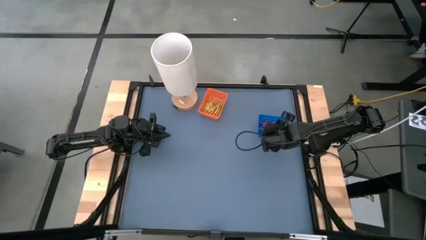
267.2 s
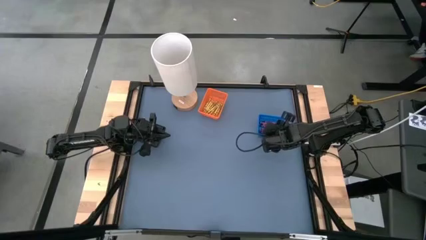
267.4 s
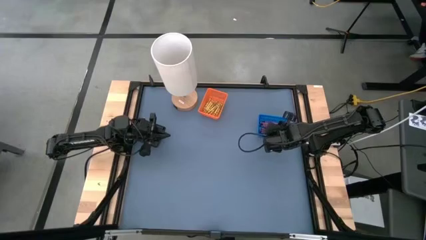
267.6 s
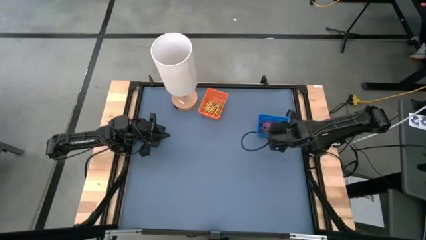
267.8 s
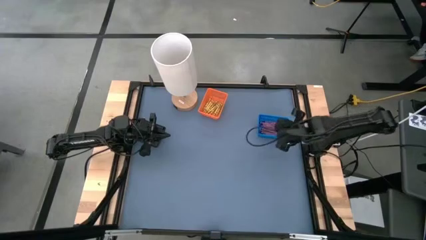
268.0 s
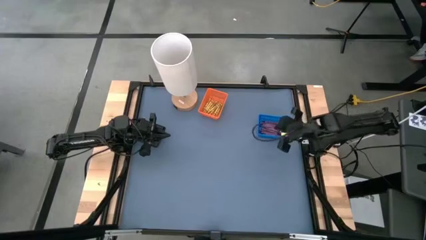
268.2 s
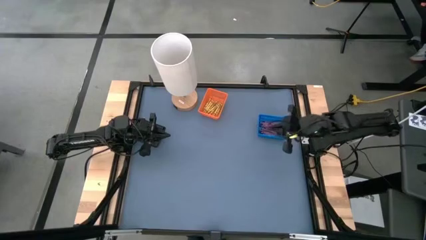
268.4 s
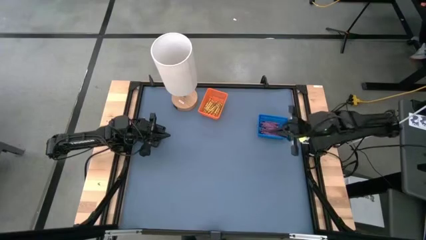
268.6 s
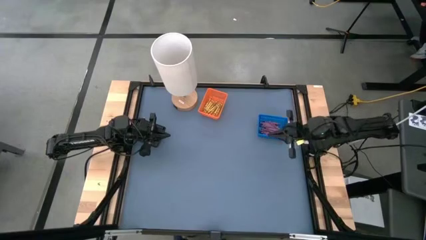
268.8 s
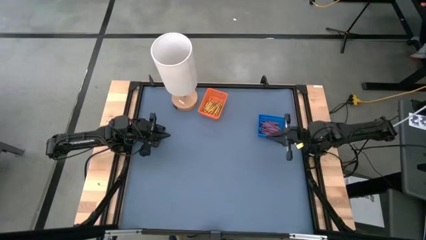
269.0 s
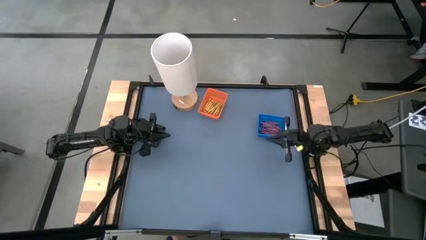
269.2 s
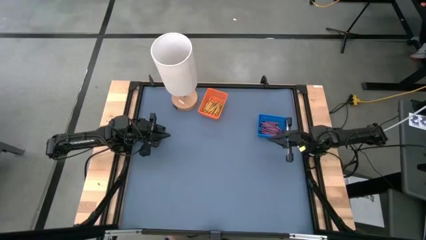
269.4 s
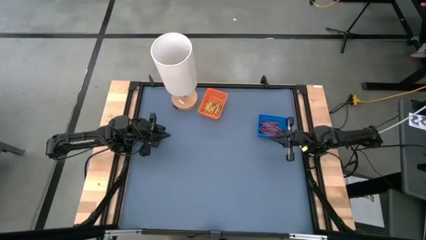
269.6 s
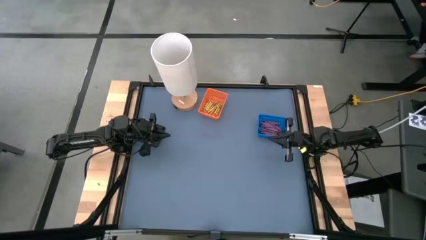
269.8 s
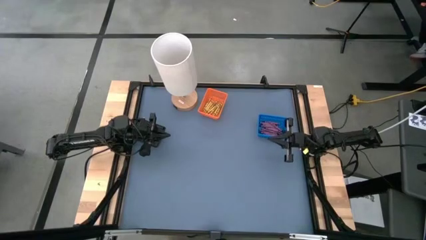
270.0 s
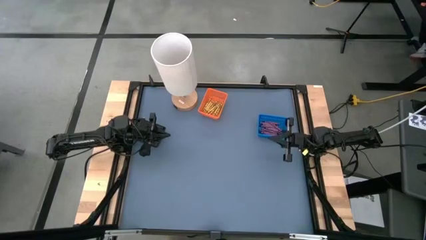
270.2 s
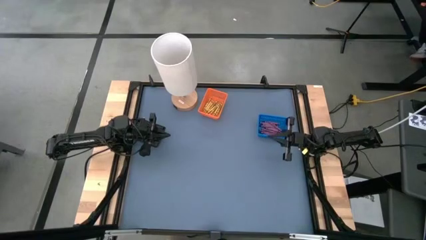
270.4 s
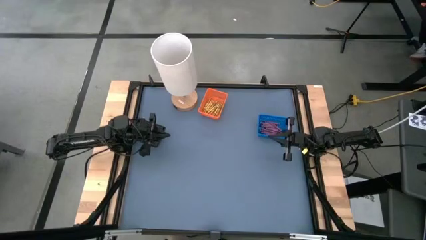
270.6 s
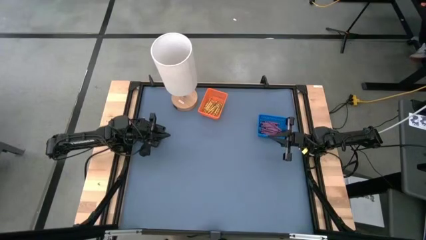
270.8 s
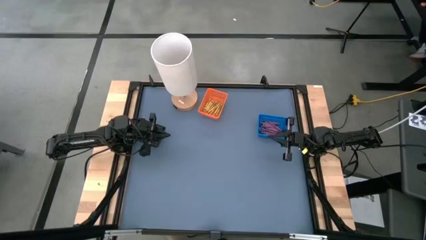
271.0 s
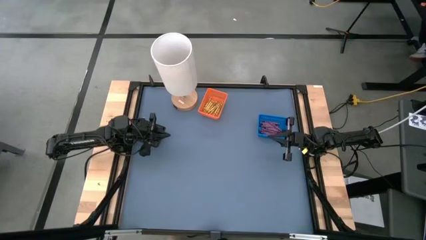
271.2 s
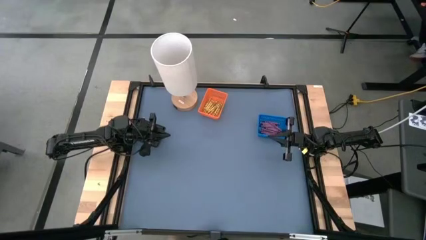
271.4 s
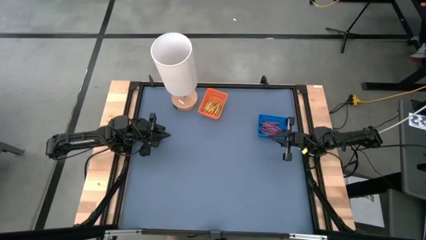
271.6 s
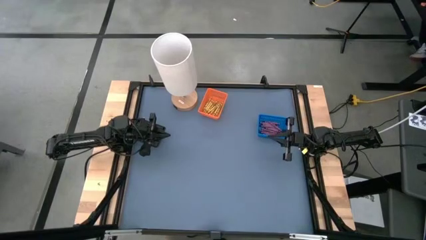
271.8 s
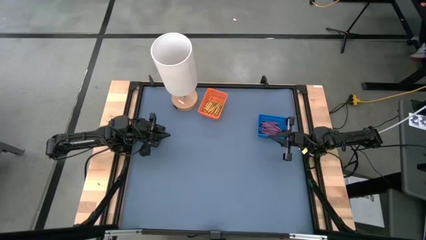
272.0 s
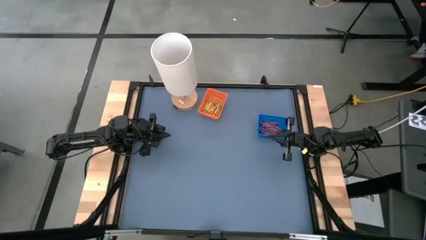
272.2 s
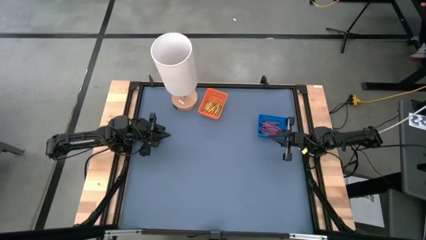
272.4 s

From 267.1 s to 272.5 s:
Task: Sort crayons
Return to Home Position

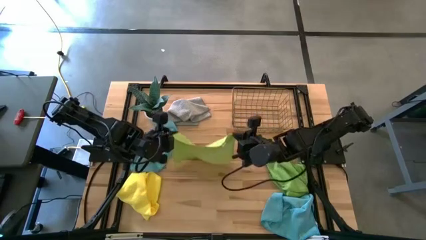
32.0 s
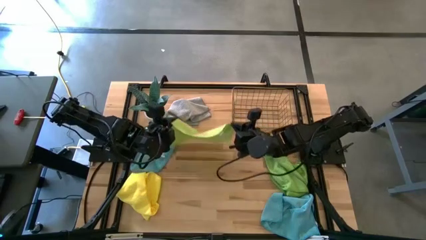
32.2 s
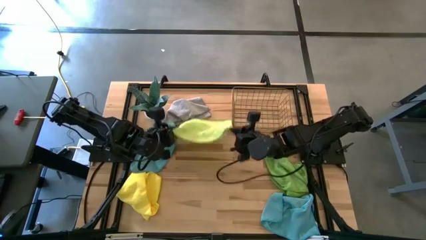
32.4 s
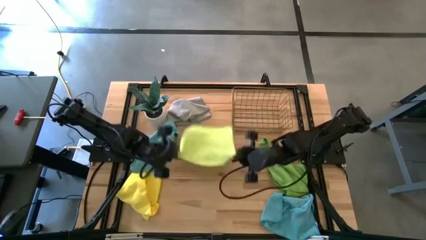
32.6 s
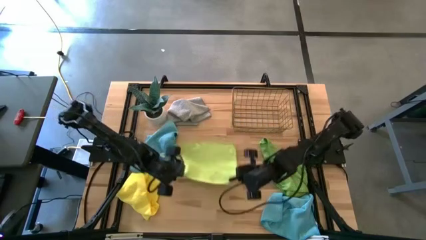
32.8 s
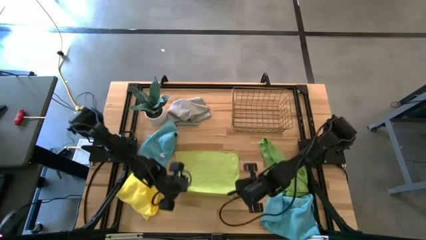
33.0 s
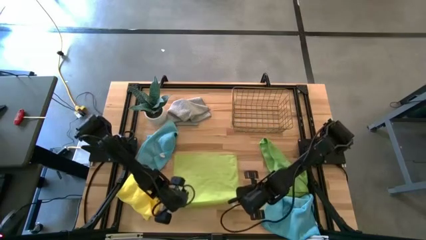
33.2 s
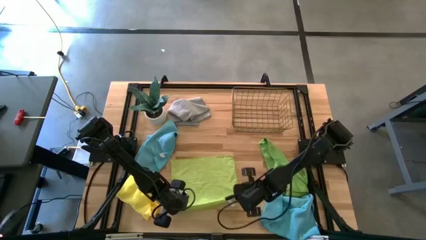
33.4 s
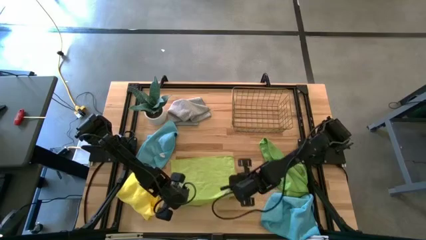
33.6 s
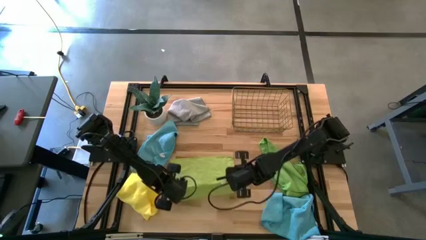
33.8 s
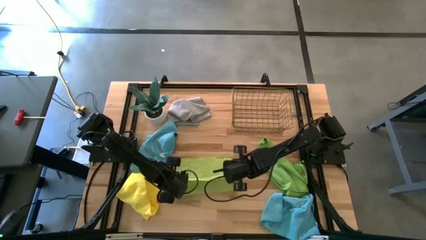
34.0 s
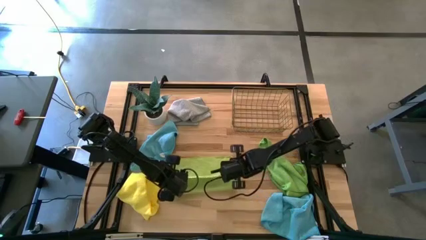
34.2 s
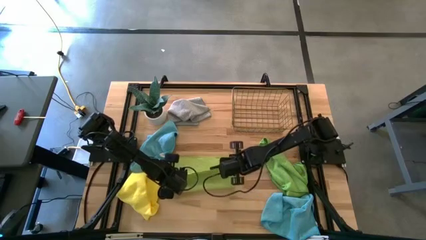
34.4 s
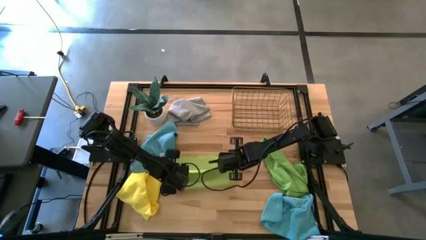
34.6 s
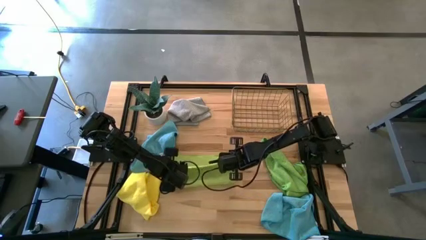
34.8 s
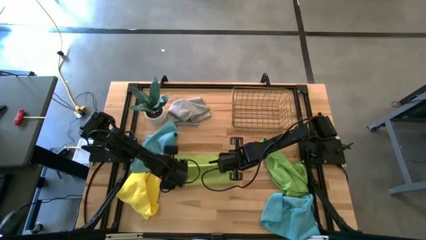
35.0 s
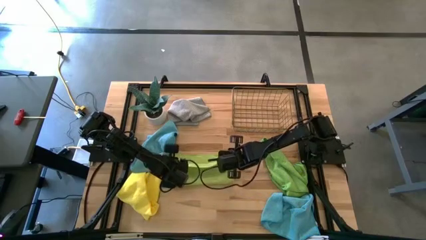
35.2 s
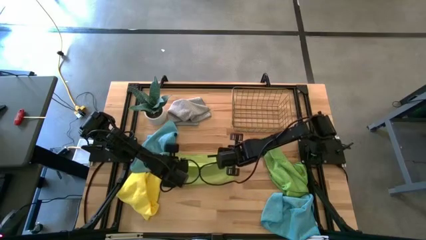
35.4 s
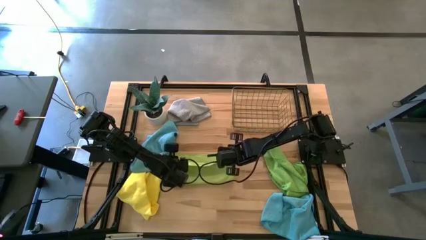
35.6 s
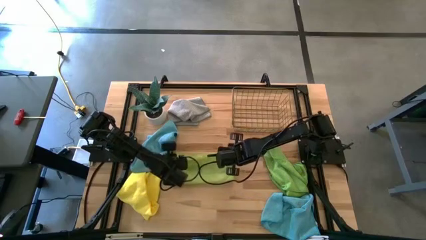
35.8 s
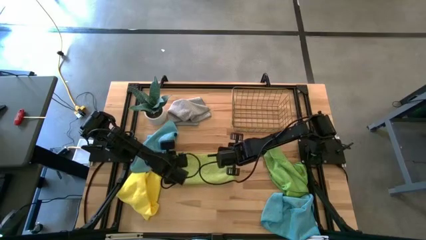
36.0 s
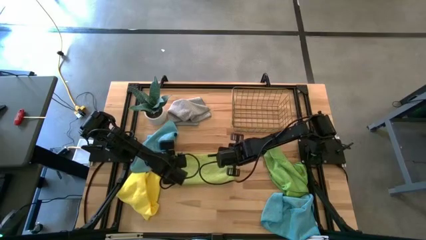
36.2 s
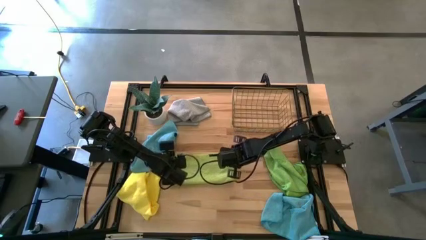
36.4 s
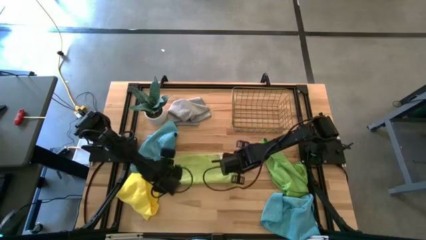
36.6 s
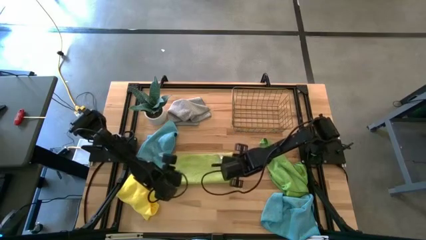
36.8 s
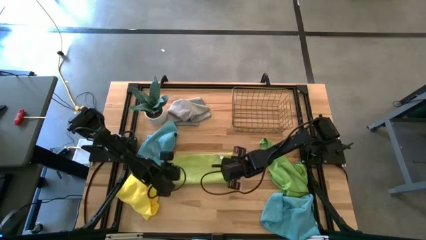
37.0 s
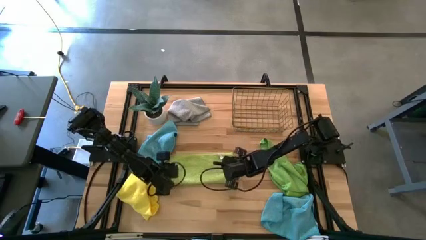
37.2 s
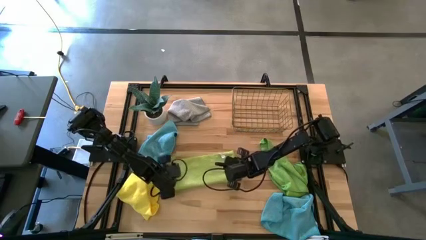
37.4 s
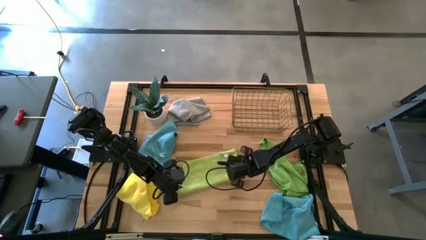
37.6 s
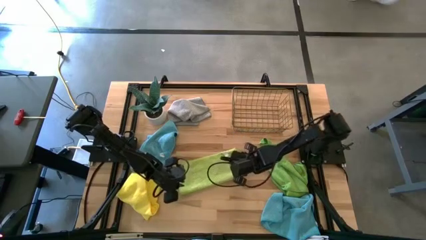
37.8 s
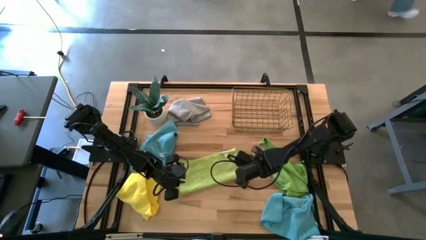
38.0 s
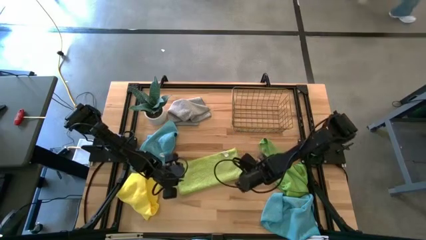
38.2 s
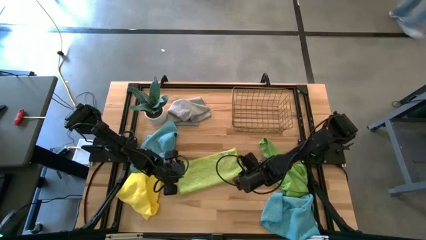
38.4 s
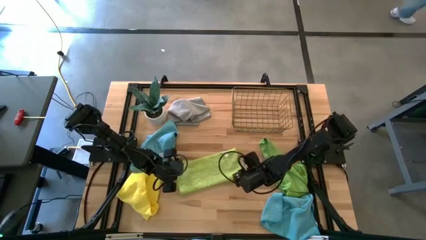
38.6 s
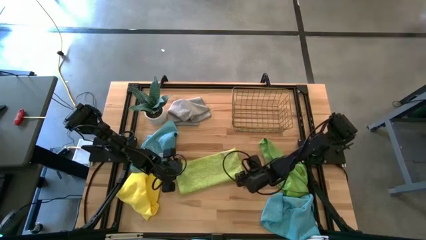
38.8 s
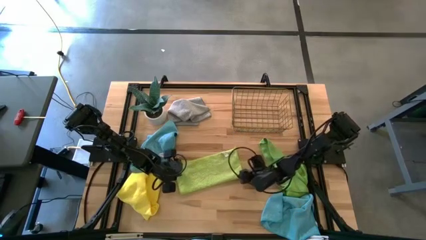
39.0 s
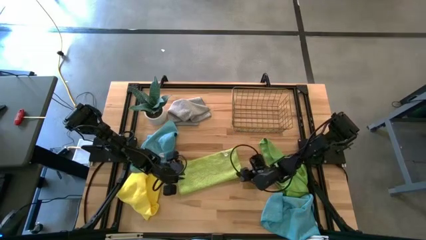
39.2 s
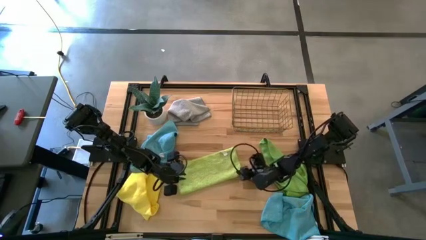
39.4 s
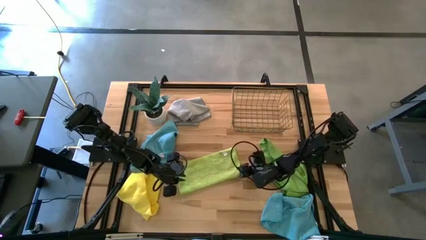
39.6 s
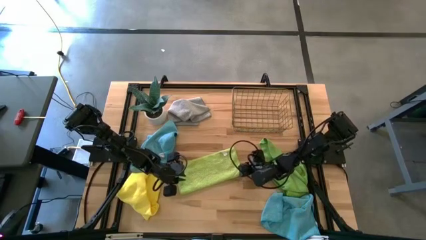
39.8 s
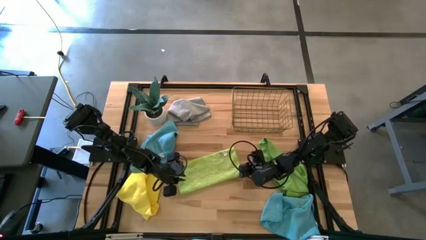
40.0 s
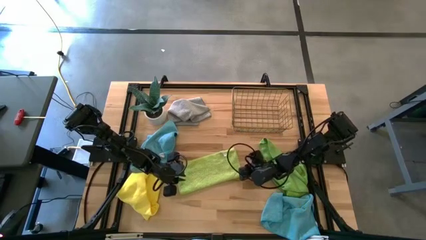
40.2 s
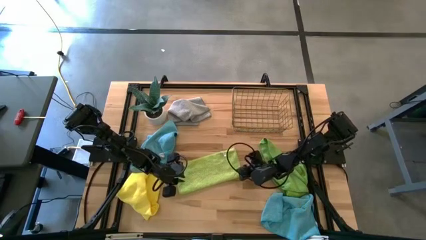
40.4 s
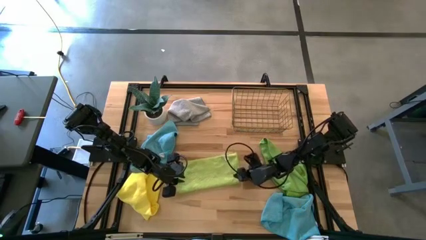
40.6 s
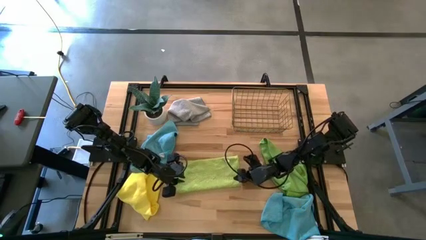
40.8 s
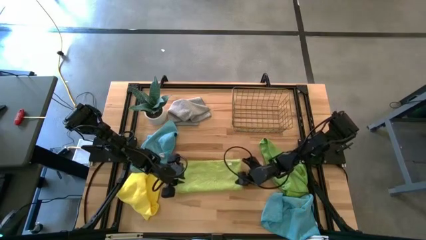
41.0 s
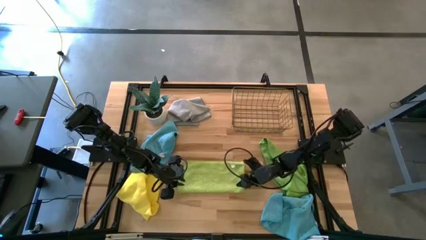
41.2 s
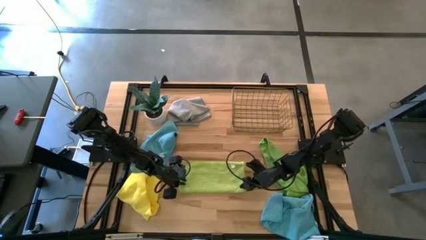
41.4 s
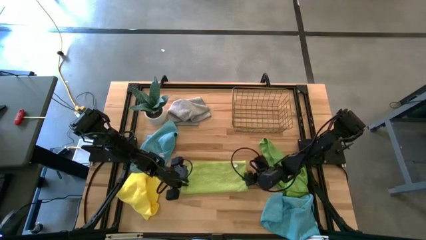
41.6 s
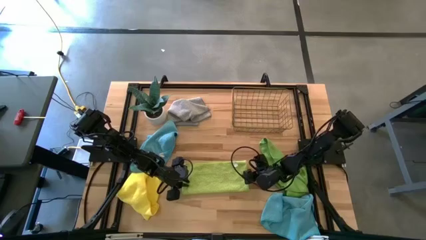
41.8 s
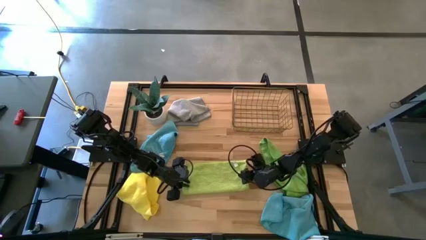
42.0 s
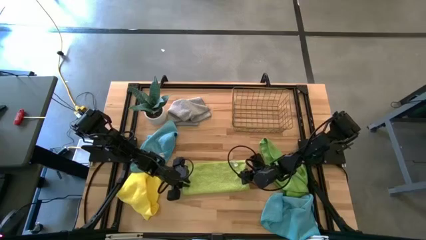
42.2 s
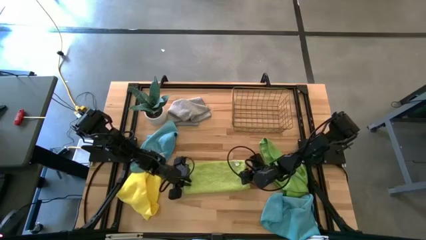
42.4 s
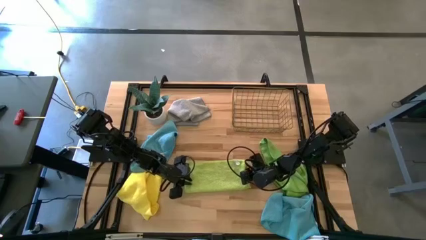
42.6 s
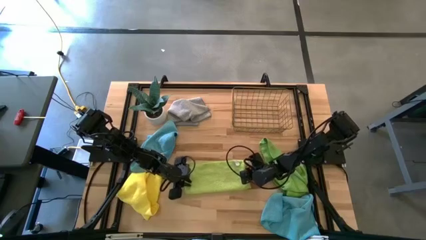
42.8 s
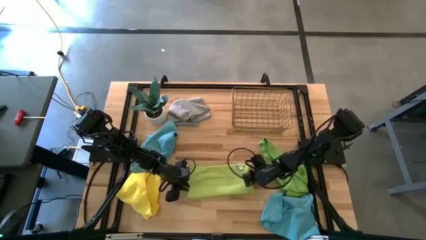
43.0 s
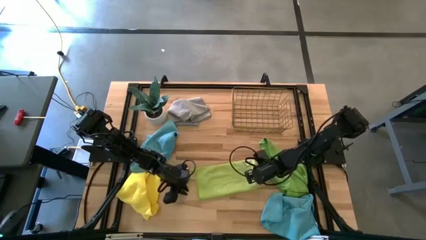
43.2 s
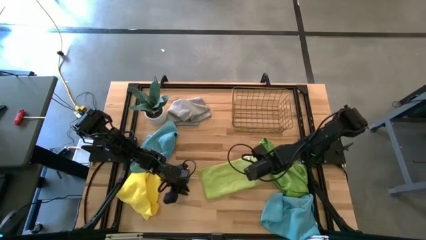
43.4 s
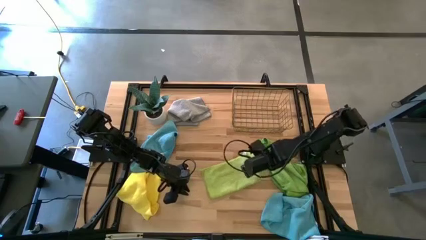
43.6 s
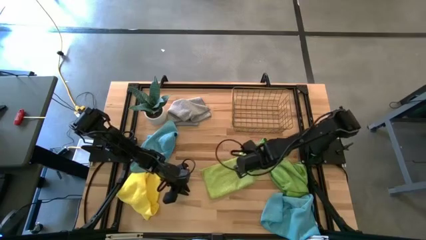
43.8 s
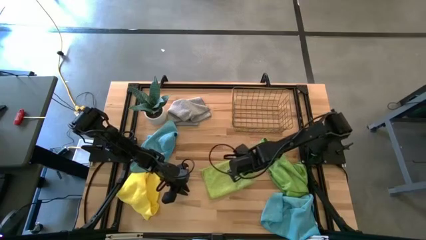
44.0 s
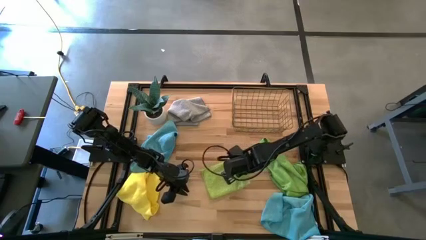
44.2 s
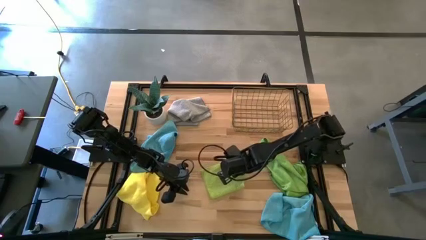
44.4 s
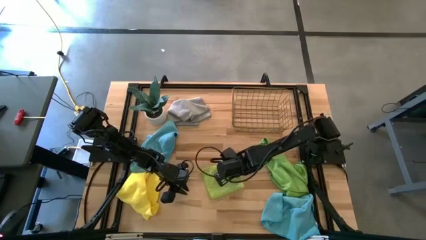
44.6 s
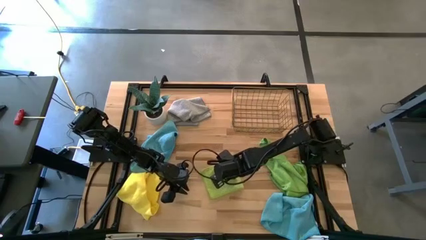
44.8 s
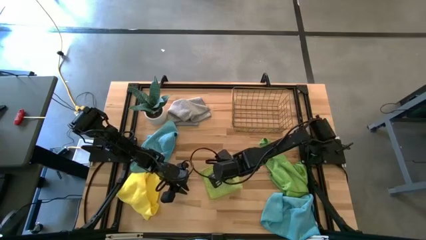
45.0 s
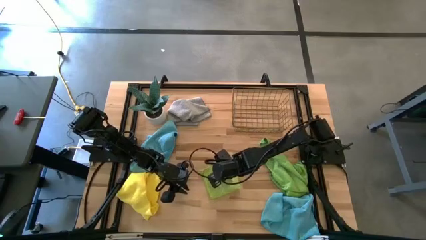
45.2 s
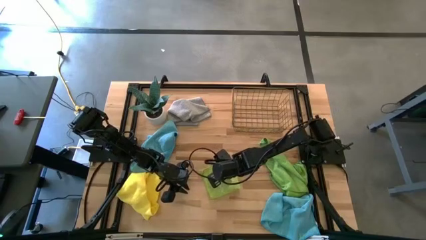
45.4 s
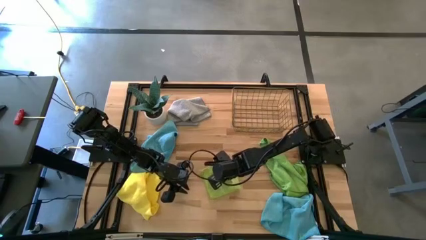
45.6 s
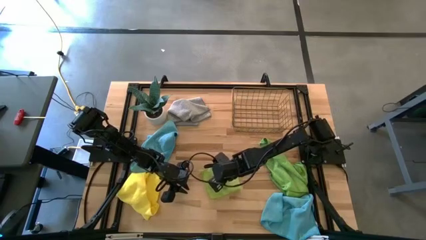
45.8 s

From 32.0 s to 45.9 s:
Task: Fold microfiber towels
Fold the light green microfiber towel
